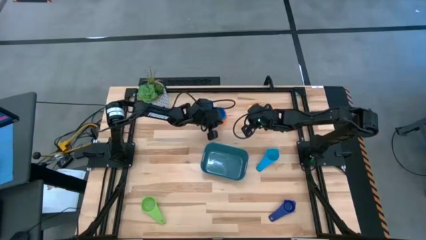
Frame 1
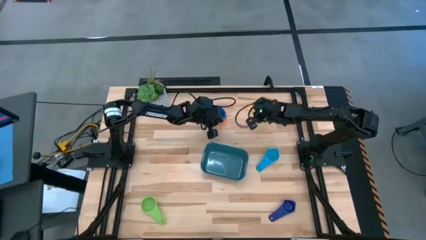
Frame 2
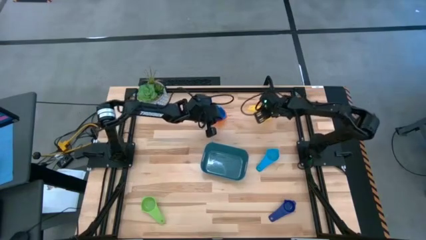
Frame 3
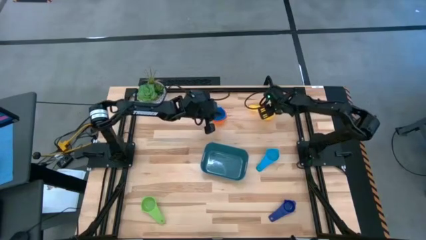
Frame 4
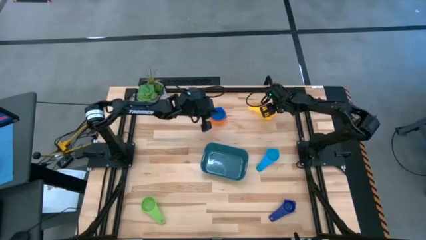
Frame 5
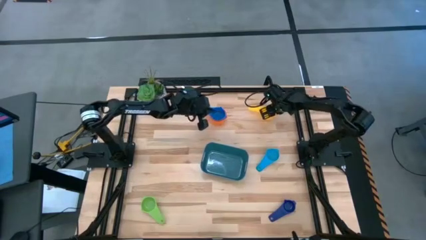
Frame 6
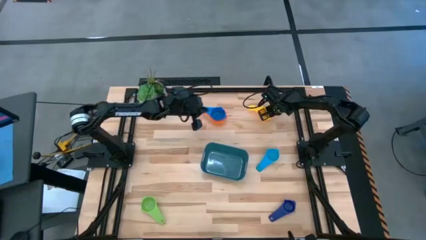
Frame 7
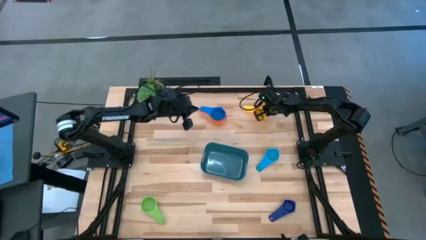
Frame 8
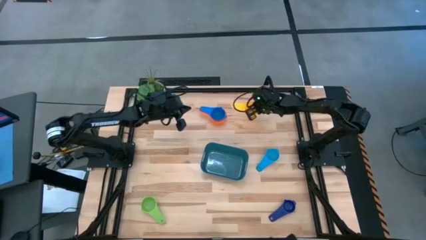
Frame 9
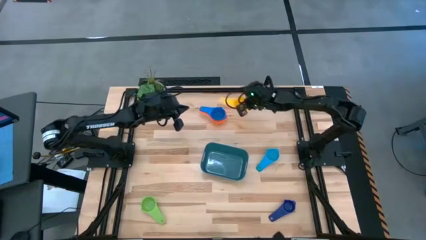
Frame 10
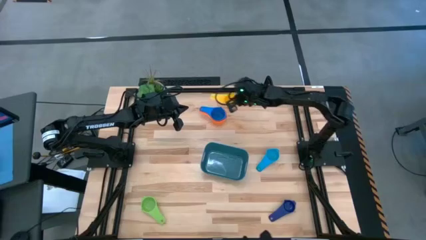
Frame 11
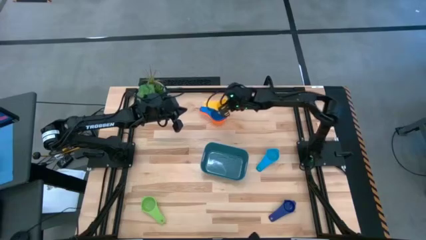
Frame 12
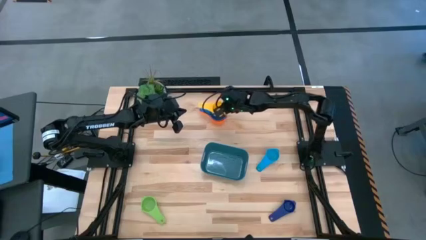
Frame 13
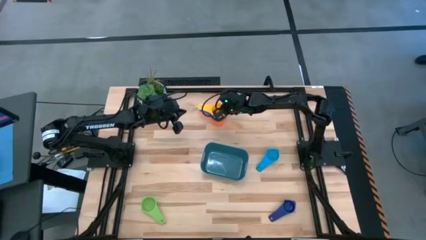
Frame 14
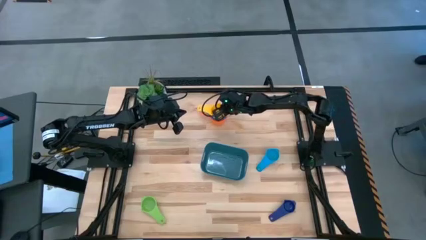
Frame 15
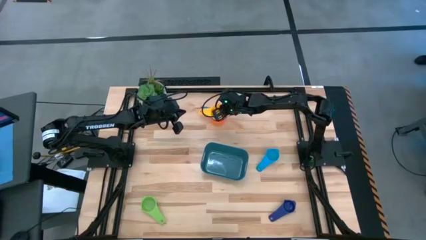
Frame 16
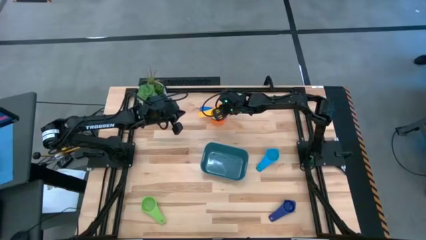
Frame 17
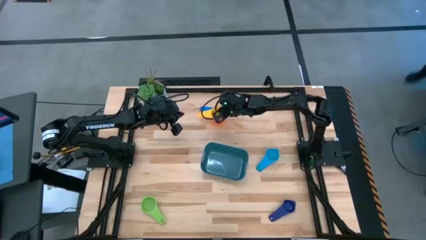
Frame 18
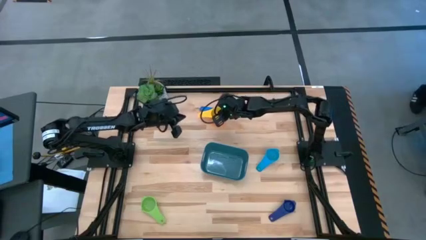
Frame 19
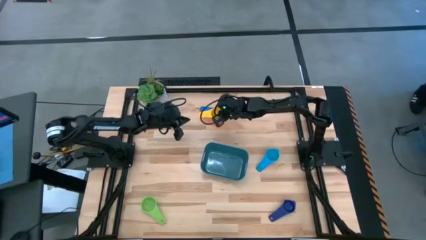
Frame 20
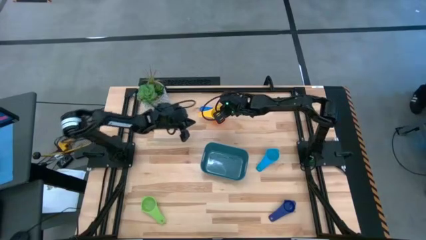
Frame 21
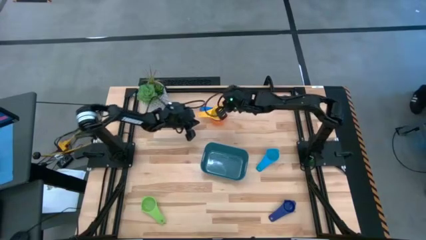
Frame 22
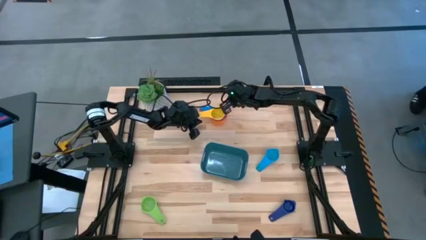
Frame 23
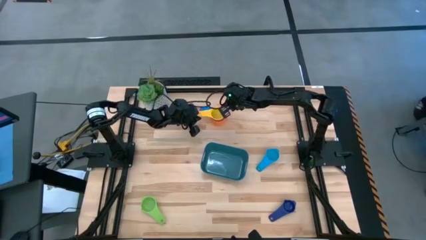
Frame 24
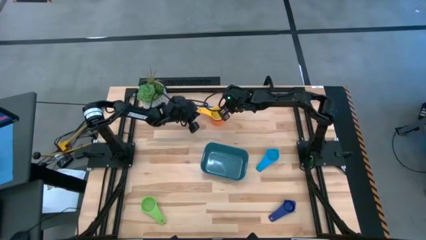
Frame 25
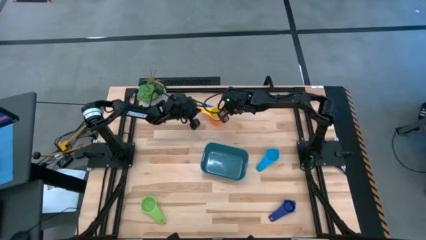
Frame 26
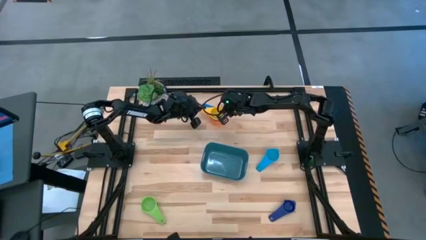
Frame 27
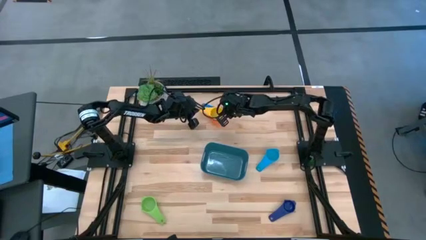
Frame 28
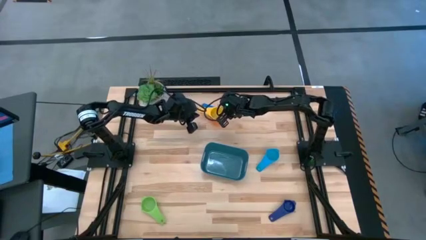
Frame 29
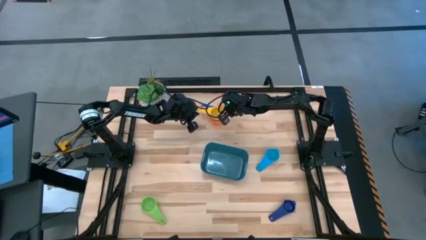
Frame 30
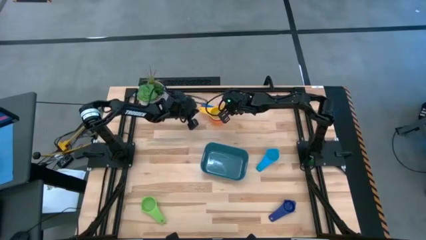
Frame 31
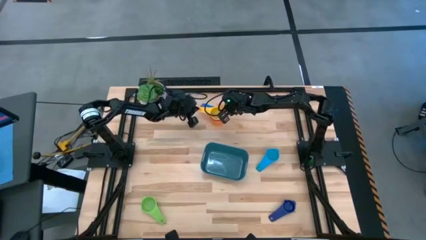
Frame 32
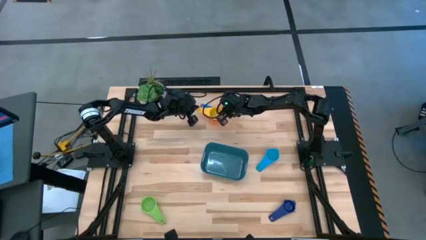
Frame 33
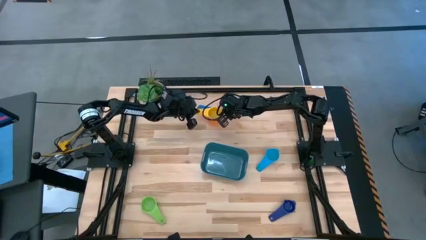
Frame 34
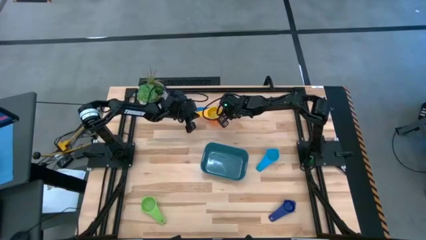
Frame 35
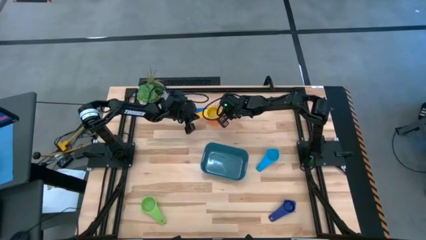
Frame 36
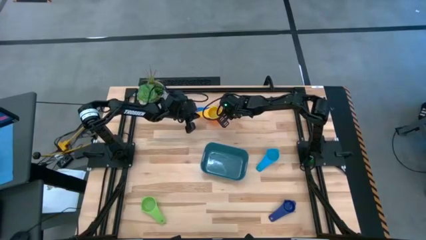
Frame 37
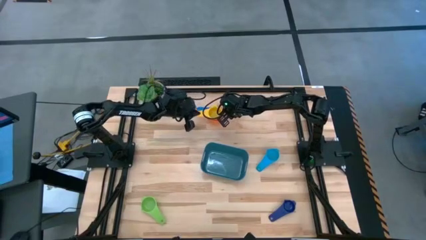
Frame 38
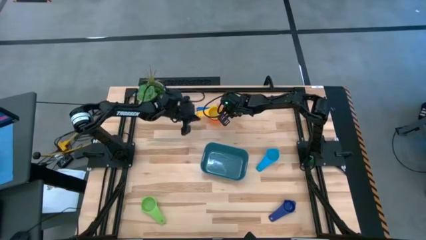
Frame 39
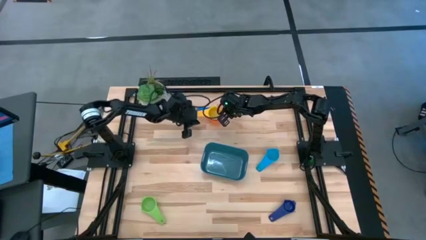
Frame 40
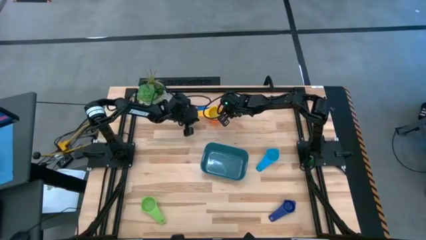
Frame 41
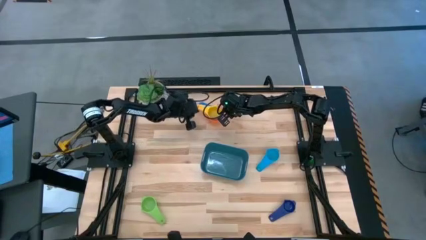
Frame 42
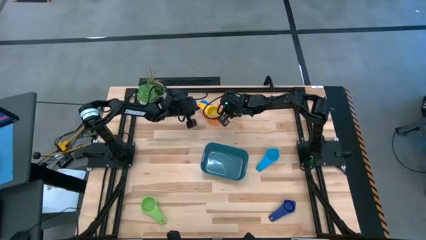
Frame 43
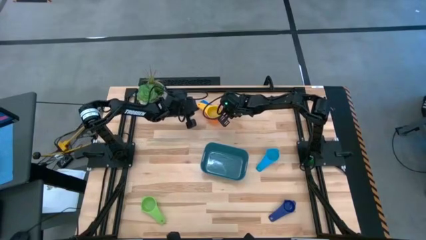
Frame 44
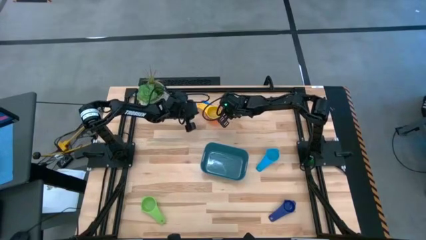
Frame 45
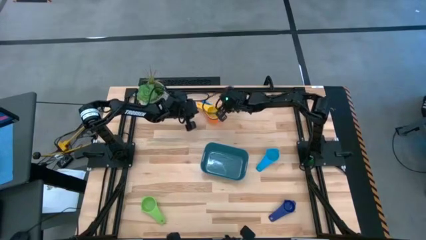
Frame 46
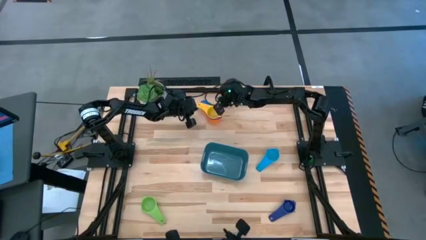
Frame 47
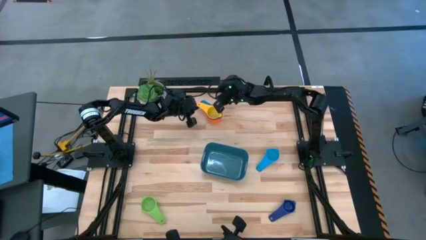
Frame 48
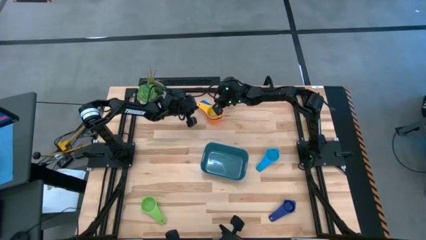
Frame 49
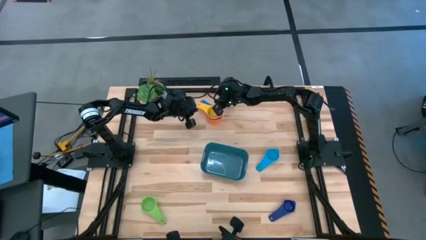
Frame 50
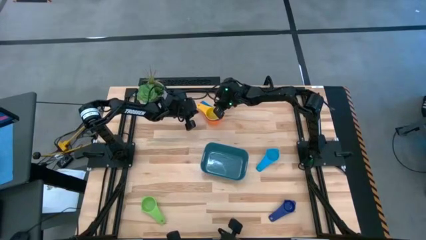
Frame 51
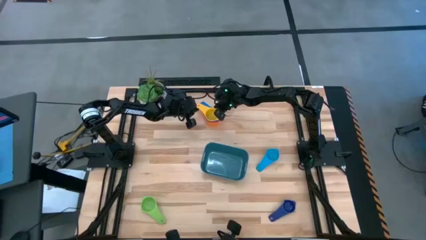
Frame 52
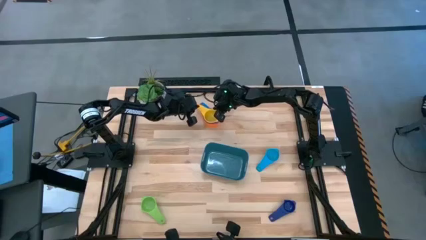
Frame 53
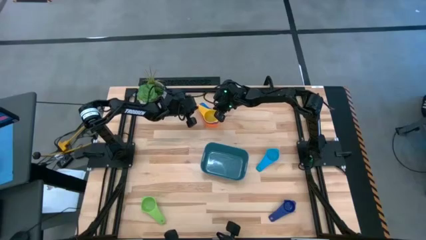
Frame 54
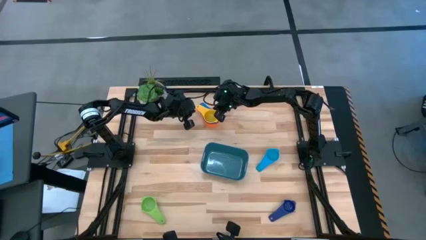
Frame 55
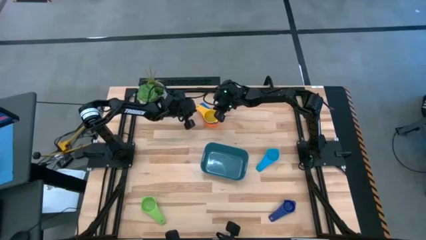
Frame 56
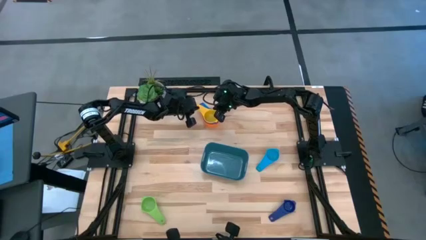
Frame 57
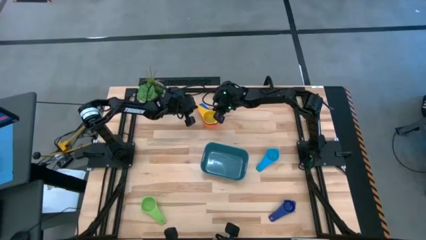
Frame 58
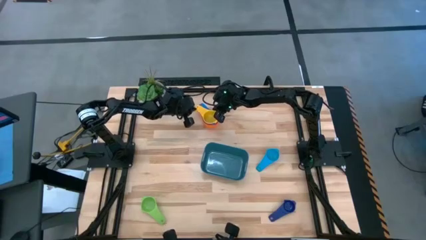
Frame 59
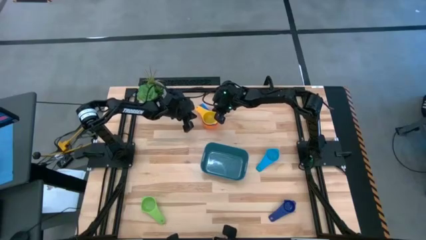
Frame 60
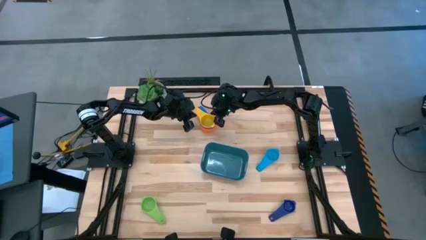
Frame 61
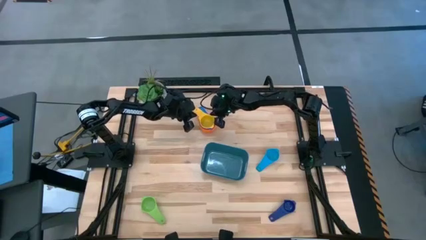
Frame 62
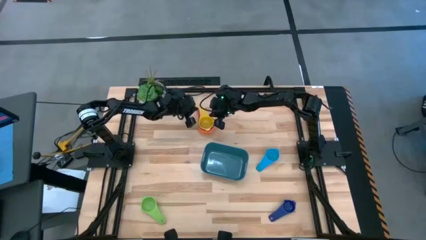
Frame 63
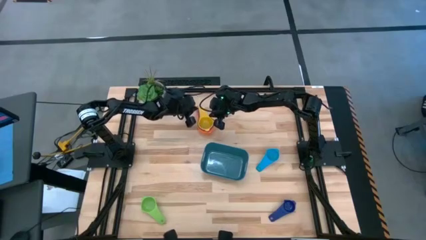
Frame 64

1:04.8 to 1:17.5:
Task: Nest measuring cups in basket
Stack the yellow measuring cup on top of the blue measuring cup

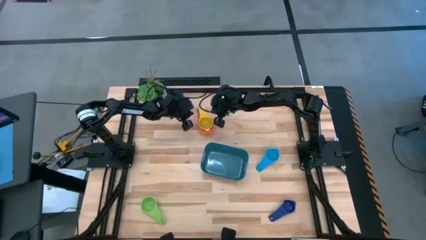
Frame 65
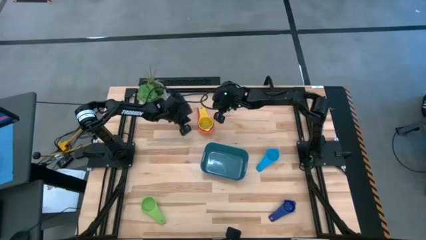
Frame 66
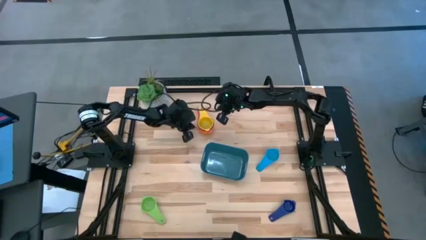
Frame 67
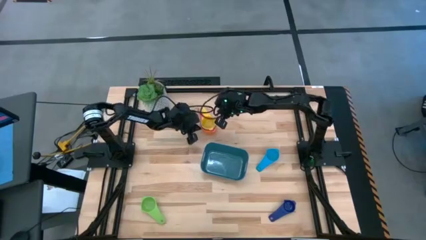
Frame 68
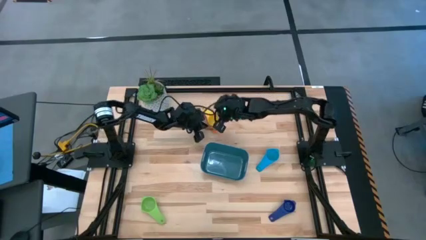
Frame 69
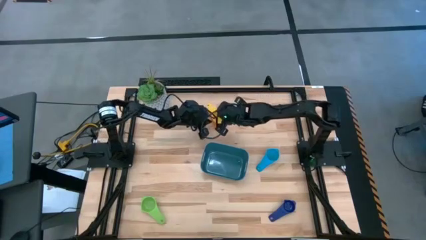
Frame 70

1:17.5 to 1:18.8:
Adjust the nested measuring cups

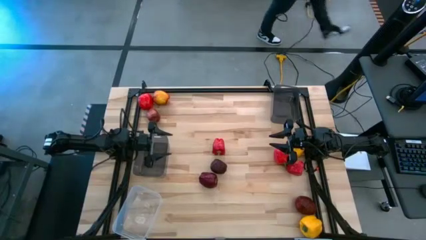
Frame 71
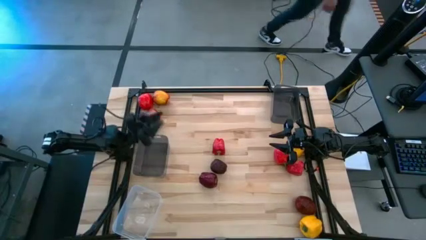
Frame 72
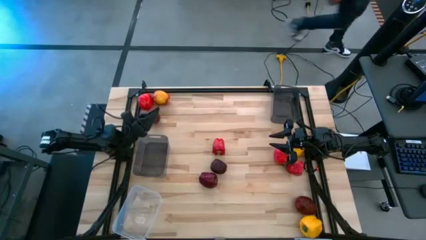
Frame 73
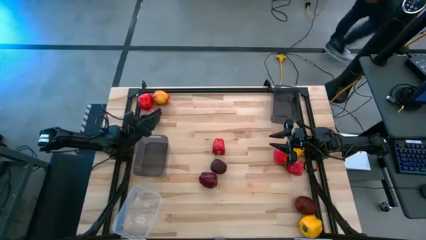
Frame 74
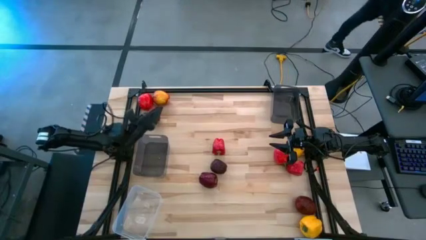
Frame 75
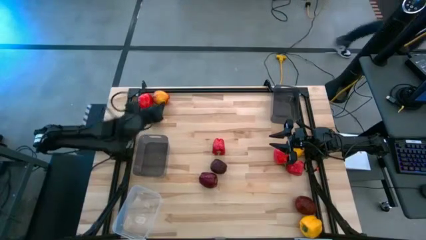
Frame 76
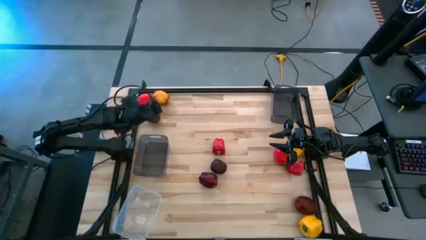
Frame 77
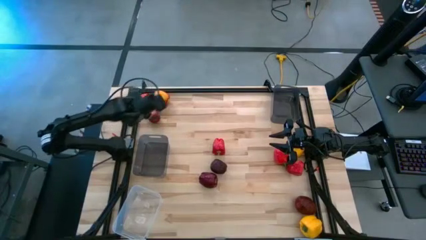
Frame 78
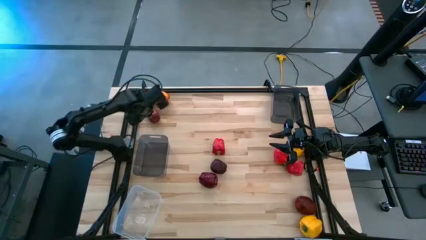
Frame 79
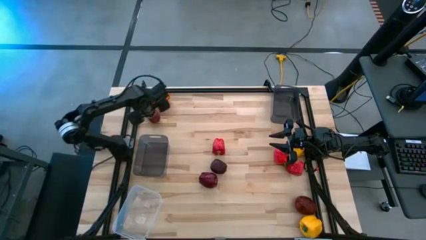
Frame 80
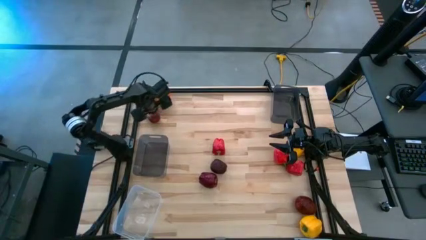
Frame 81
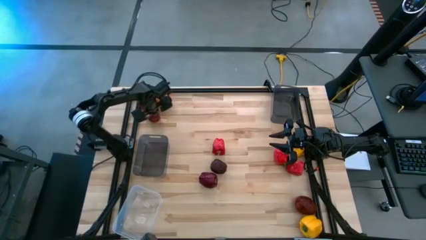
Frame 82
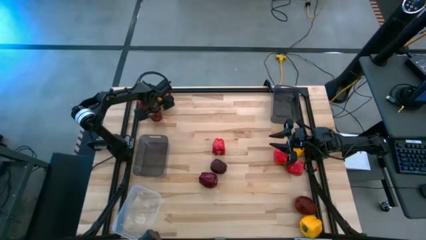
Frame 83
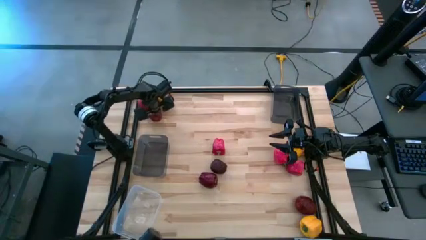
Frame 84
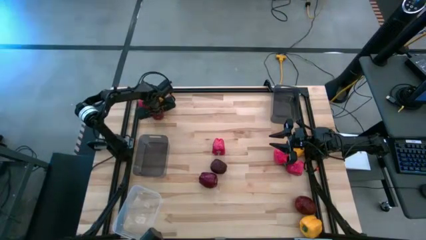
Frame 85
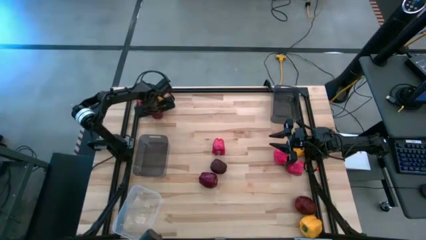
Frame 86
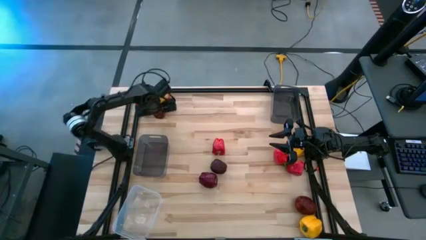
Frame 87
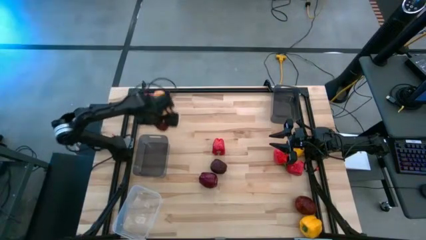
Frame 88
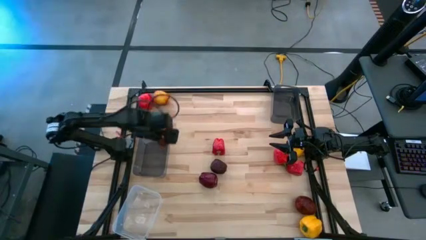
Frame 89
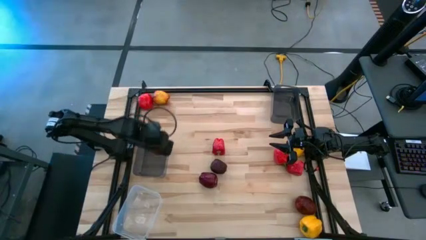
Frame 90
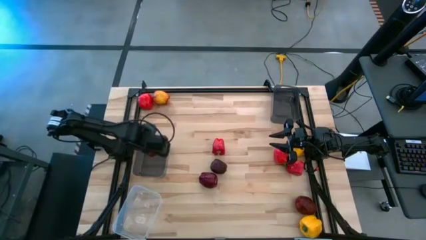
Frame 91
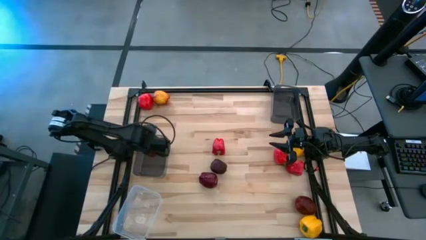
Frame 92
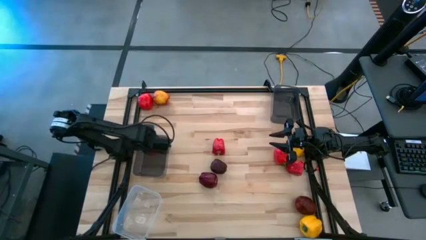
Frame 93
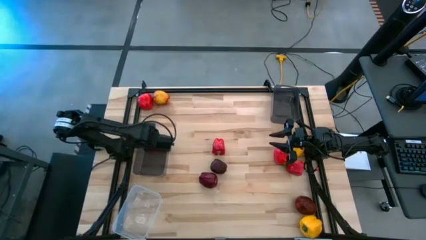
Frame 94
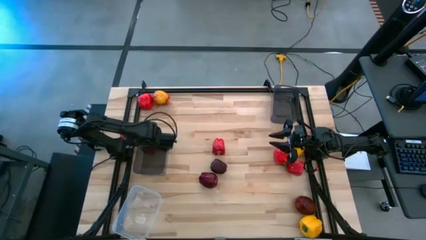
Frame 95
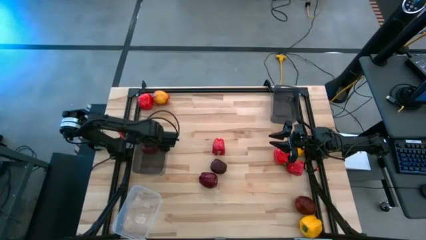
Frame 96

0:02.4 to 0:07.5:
Task: Sort produce into baskets
Put the red apple into the left black transparent bin
